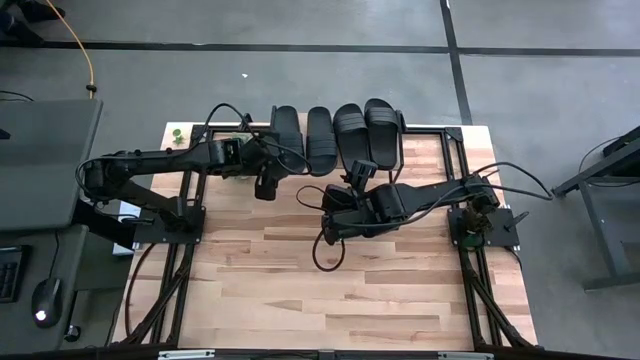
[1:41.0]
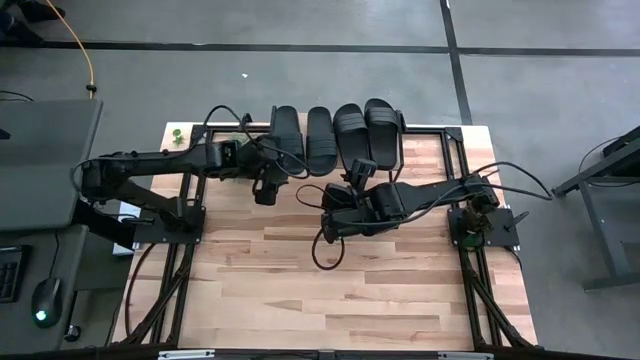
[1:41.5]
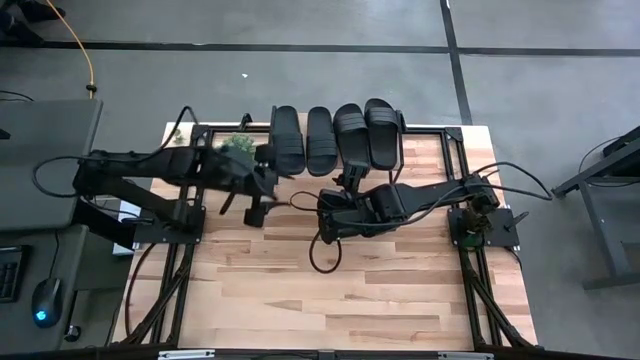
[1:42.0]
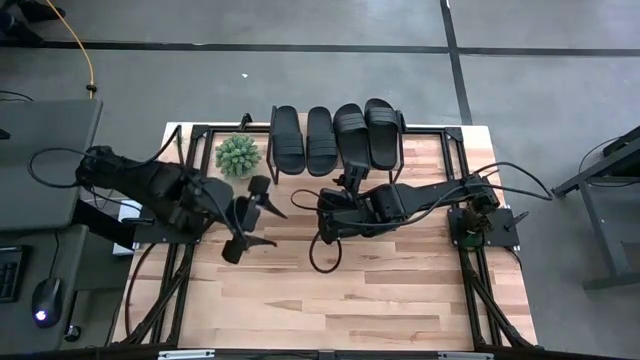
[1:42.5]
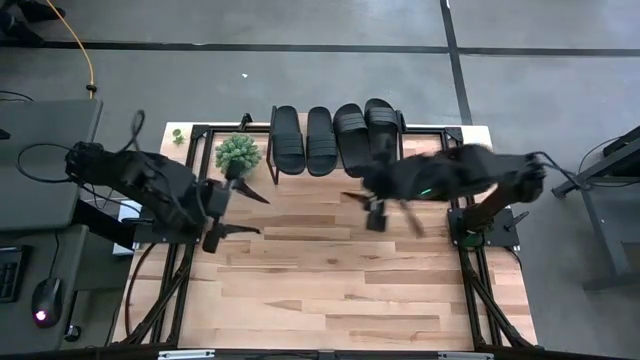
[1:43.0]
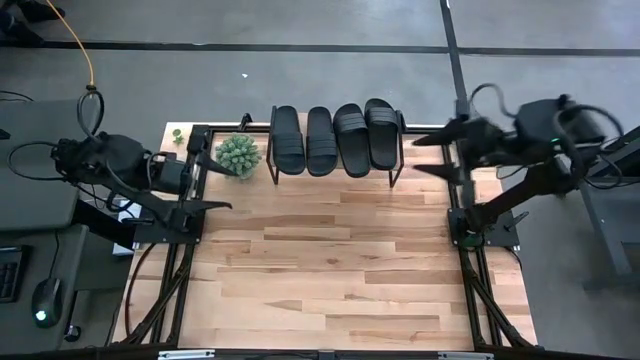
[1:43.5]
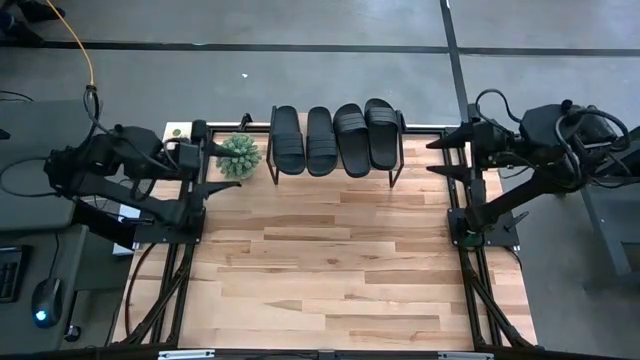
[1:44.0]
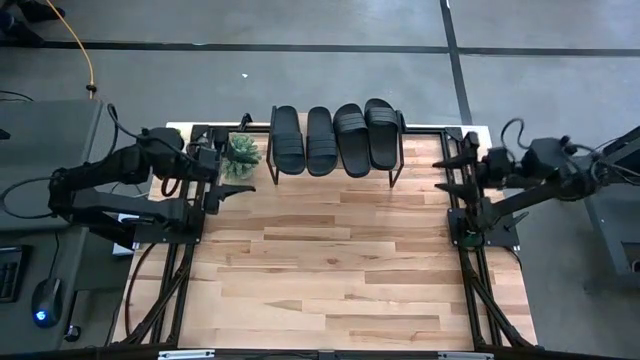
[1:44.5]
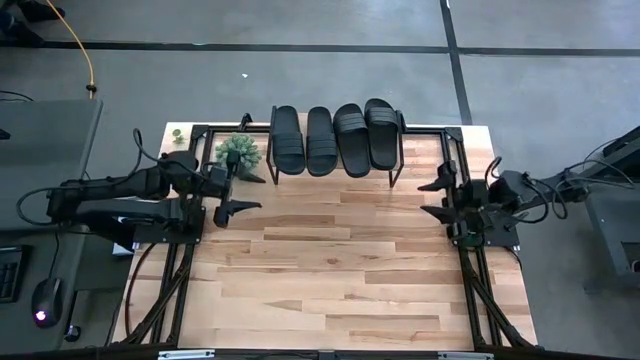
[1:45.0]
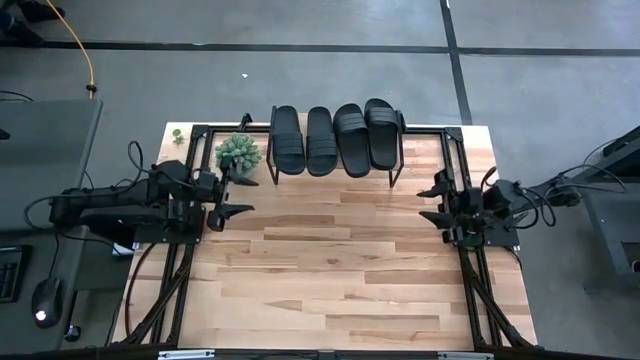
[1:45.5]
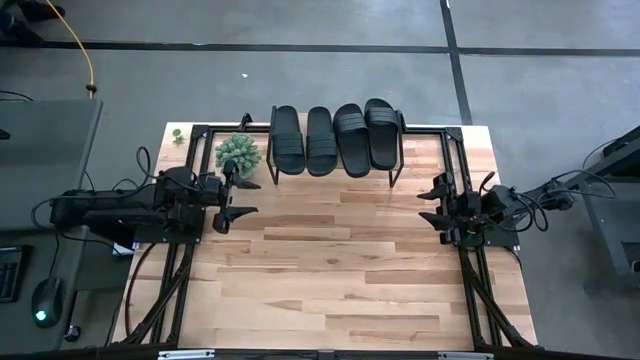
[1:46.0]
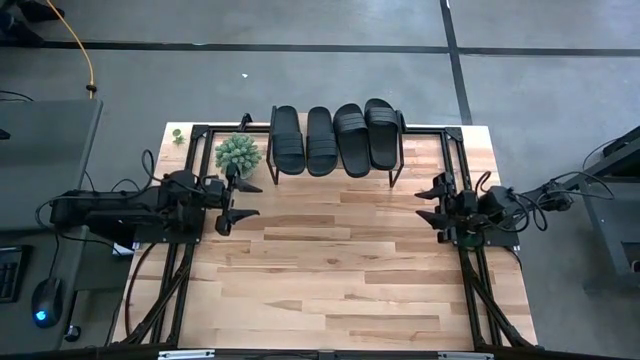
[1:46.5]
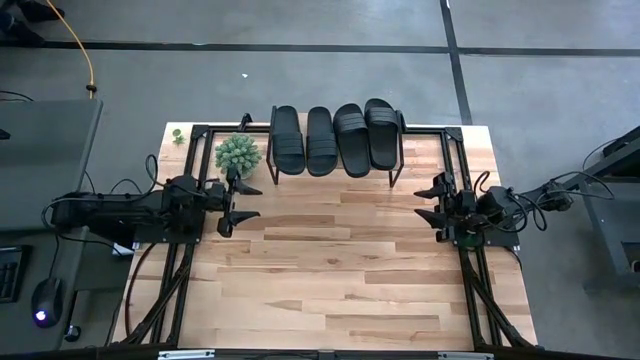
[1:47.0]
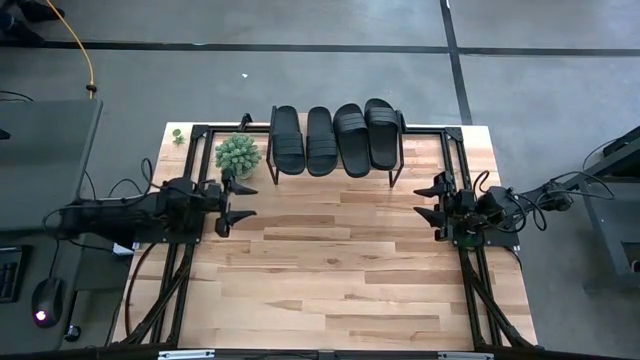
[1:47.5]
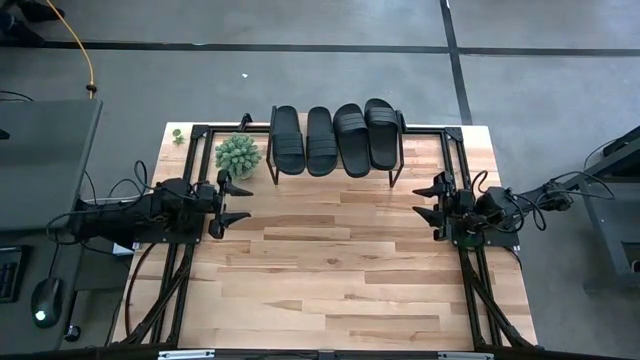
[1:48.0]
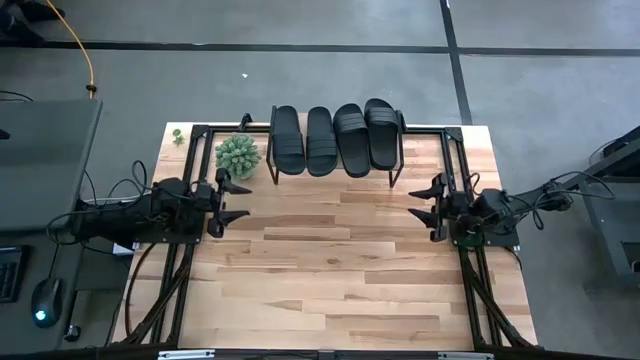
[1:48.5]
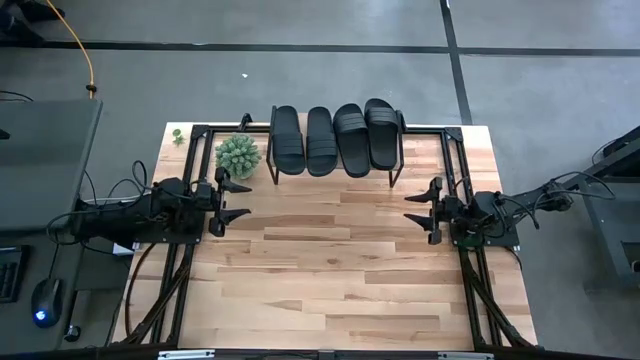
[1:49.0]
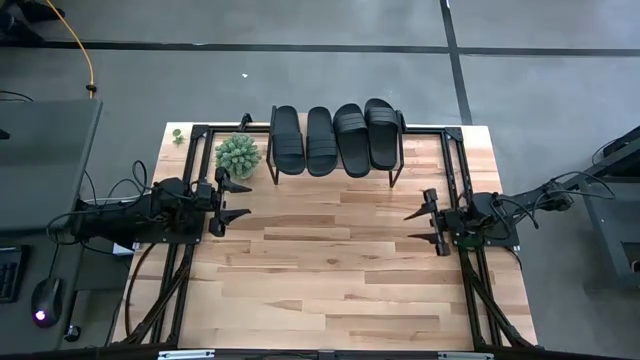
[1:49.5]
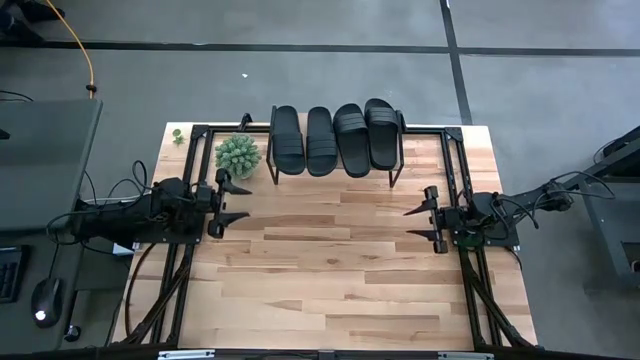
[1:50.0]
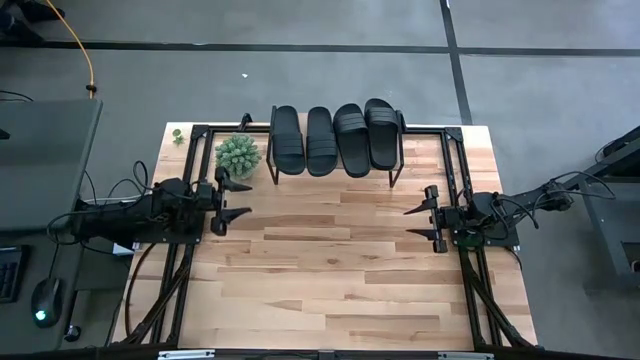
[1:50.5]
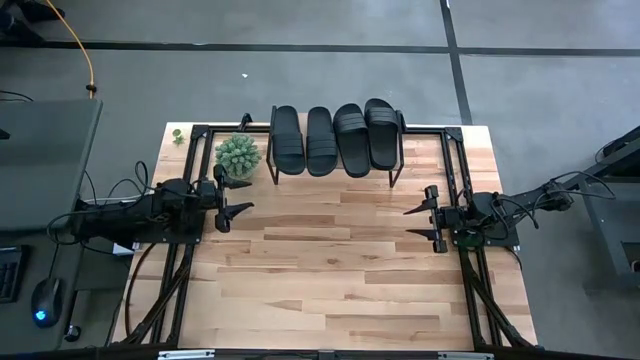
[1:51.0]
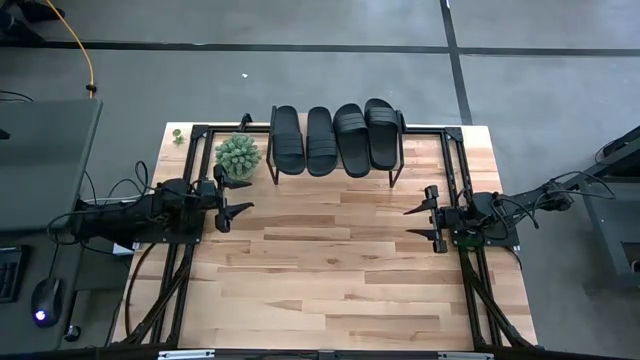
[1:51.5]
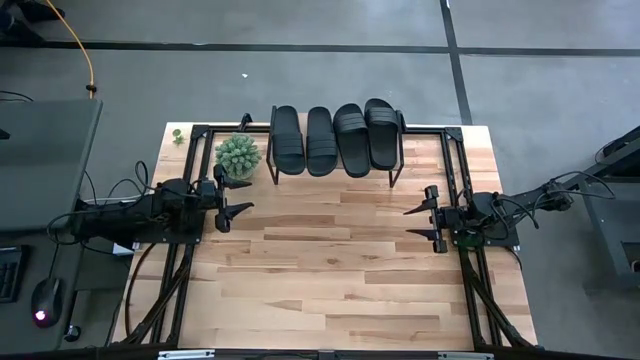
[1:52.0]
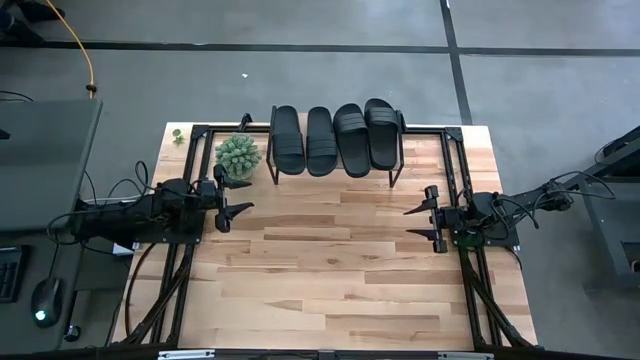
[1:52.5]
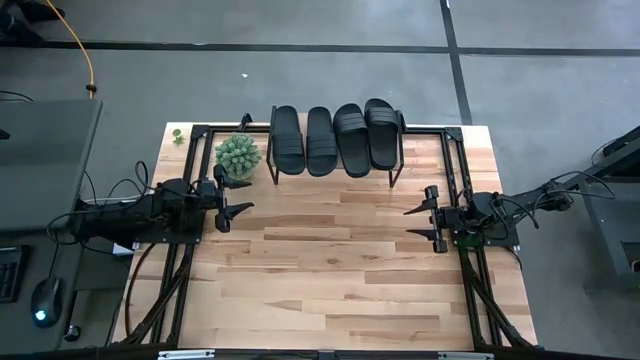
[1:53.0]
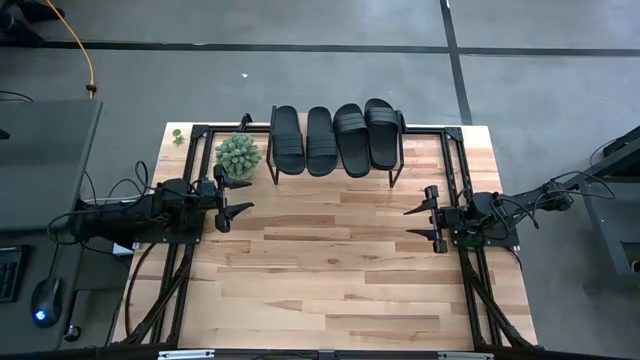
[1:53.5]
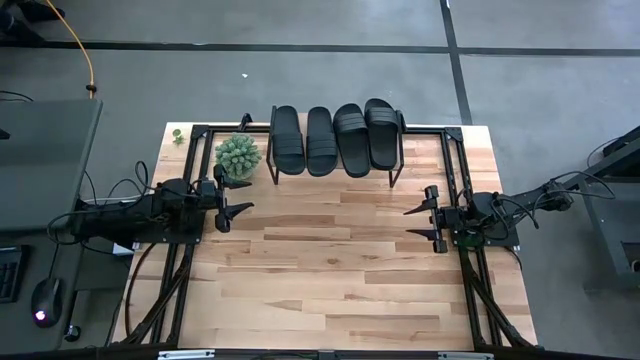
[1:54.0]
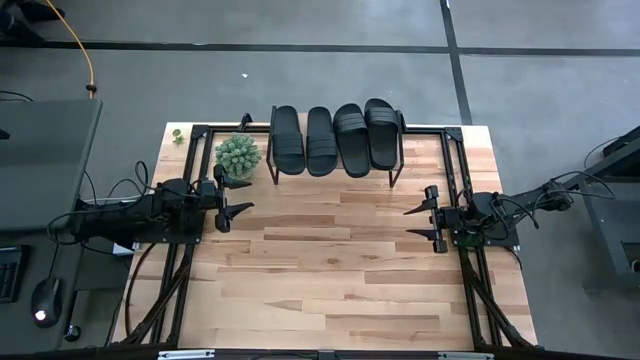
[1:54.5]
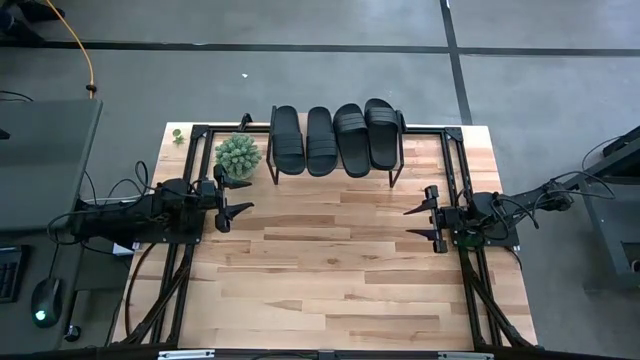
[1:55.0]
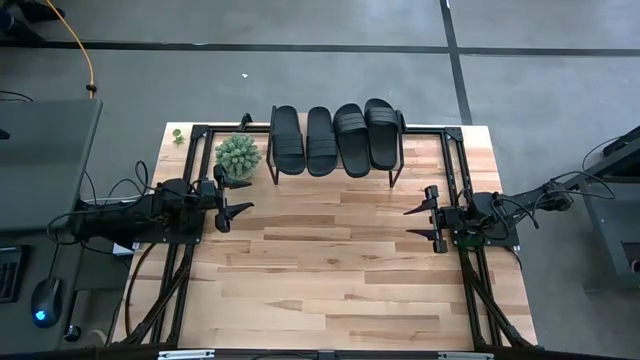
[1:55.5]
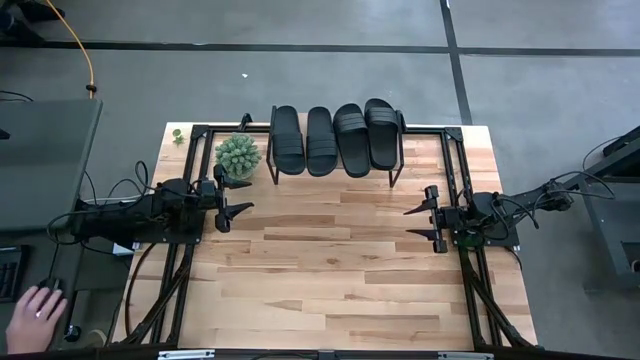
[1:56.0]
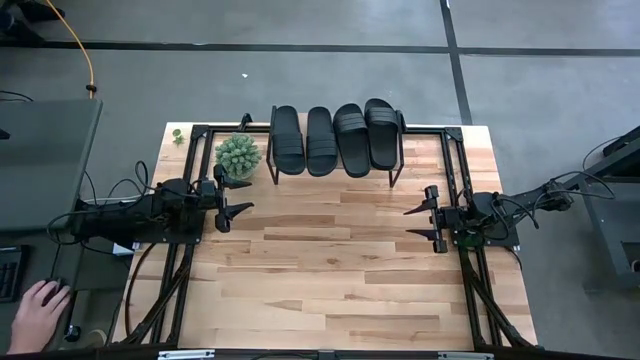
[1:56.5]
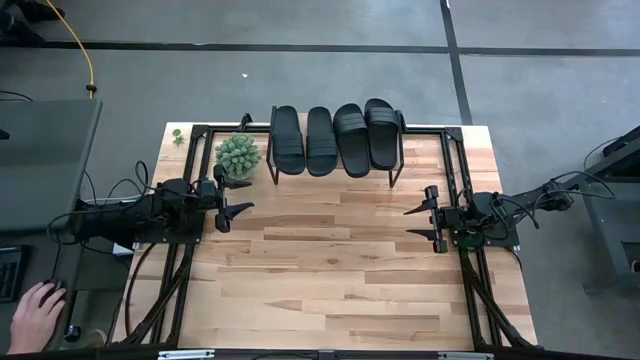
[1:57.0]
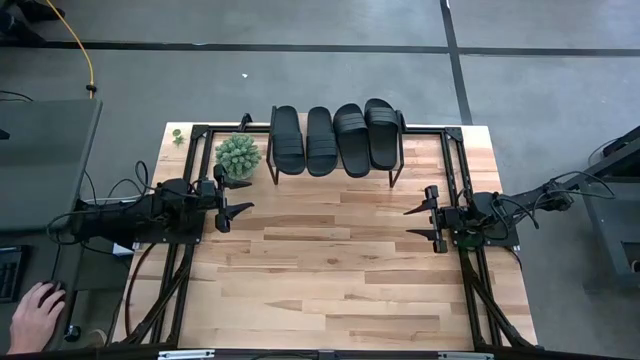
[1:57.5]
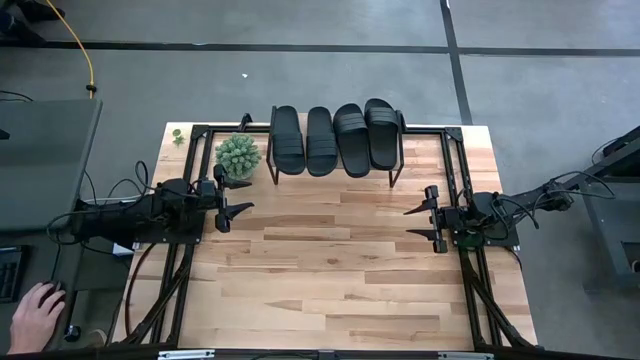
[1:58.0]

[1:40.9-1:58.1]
Task: Pick and place slides into the shelf
Return to Home Position
